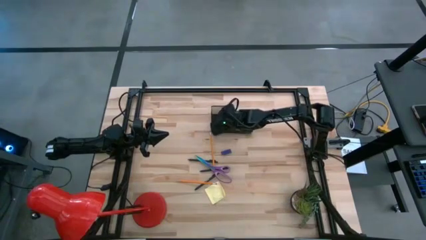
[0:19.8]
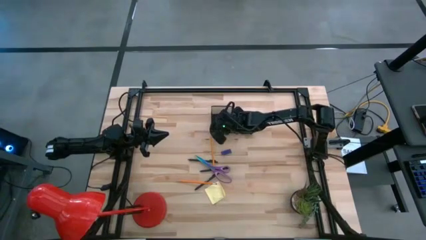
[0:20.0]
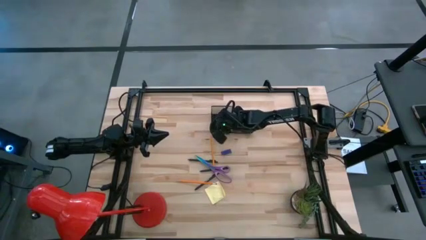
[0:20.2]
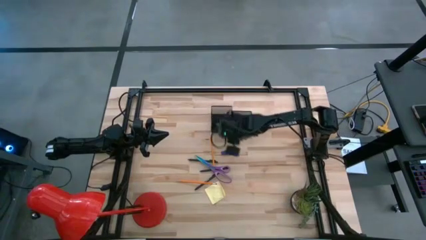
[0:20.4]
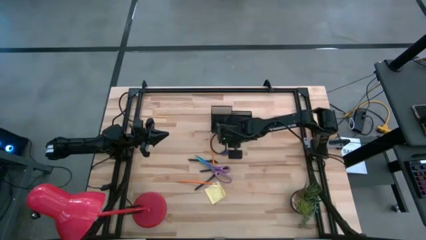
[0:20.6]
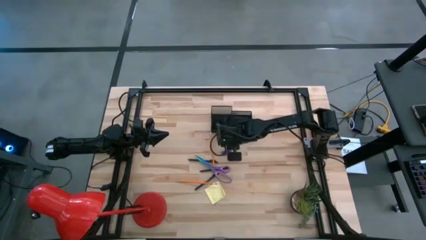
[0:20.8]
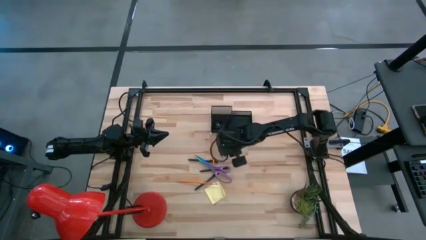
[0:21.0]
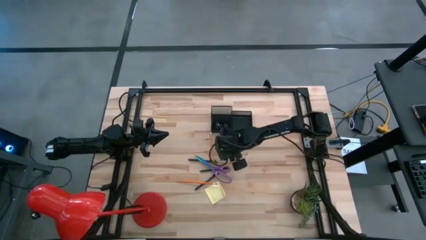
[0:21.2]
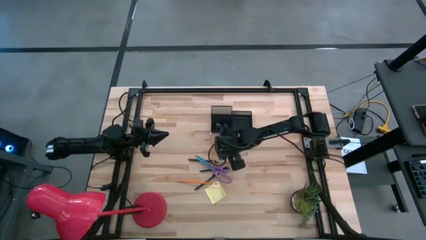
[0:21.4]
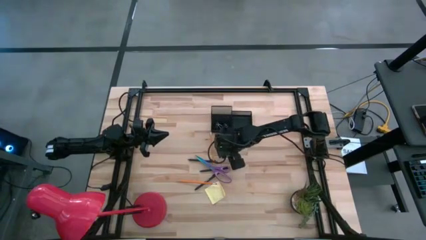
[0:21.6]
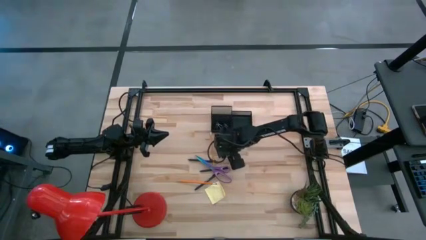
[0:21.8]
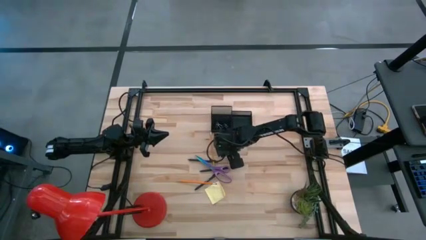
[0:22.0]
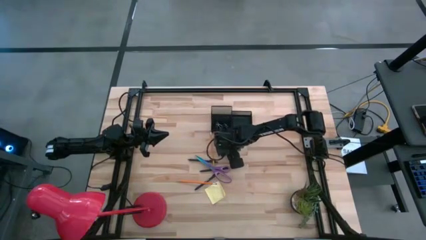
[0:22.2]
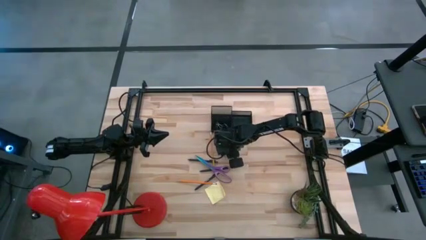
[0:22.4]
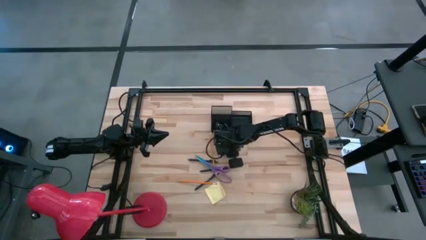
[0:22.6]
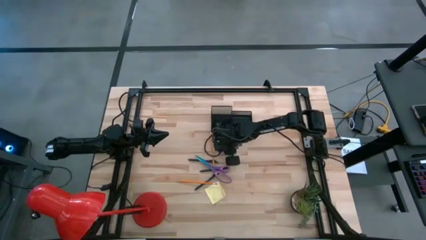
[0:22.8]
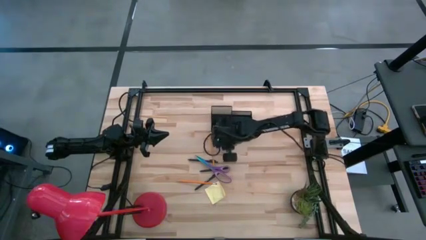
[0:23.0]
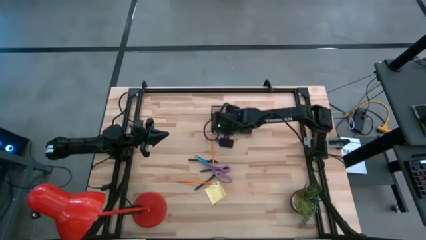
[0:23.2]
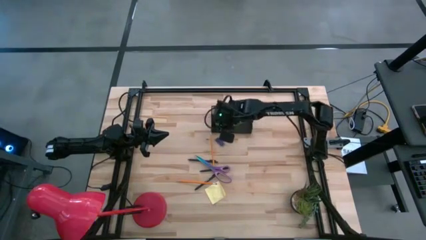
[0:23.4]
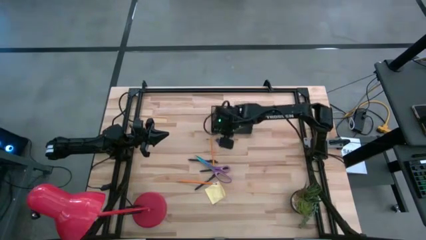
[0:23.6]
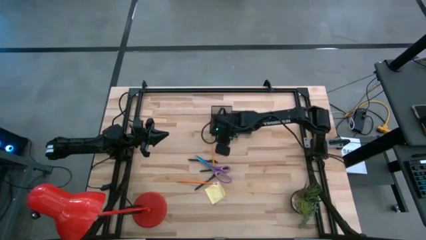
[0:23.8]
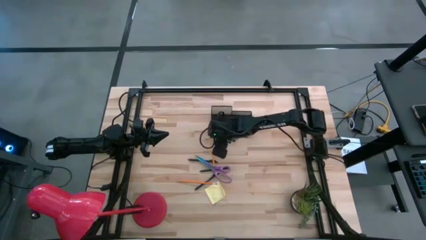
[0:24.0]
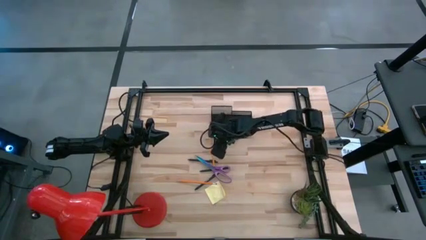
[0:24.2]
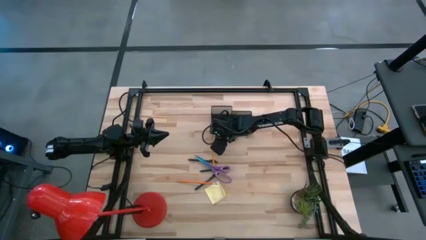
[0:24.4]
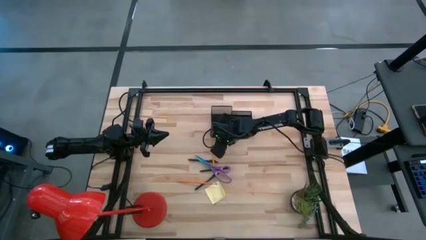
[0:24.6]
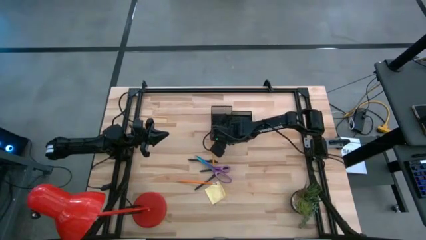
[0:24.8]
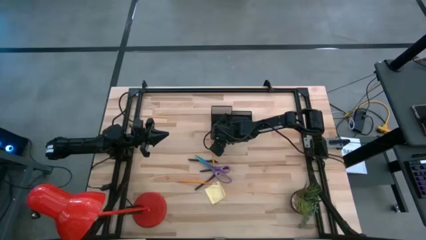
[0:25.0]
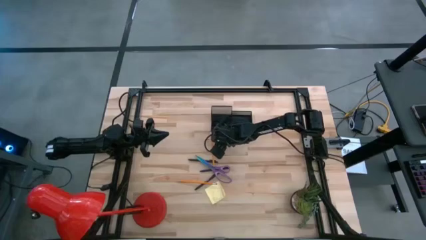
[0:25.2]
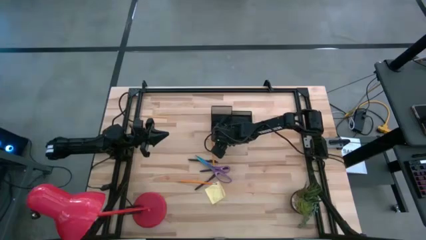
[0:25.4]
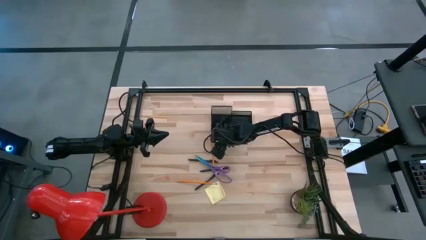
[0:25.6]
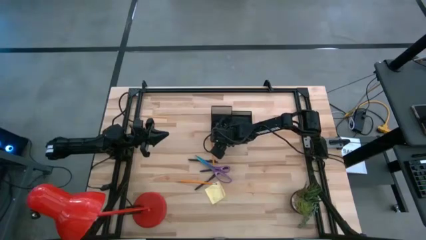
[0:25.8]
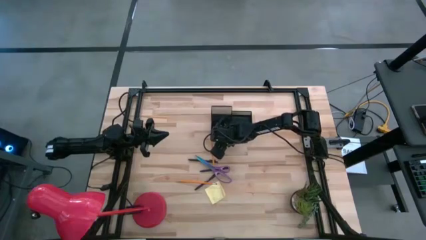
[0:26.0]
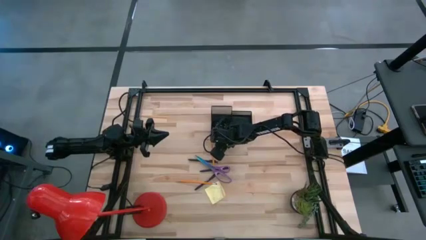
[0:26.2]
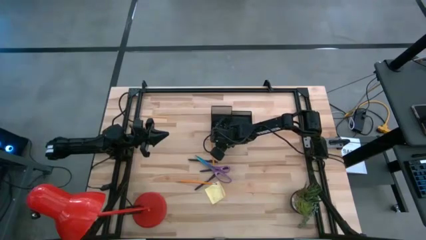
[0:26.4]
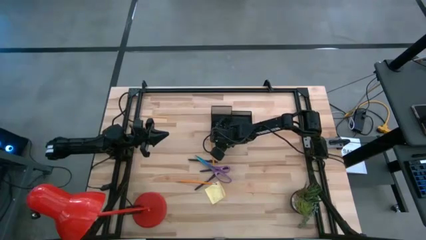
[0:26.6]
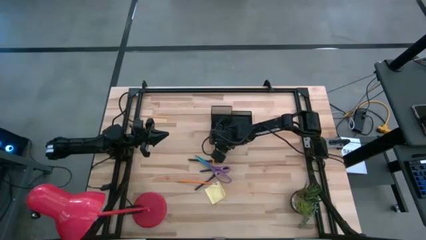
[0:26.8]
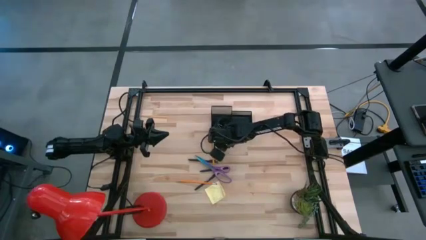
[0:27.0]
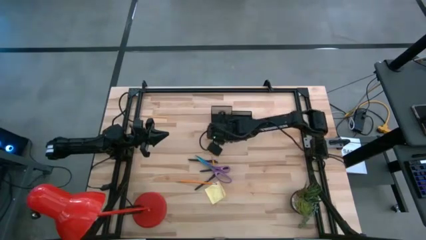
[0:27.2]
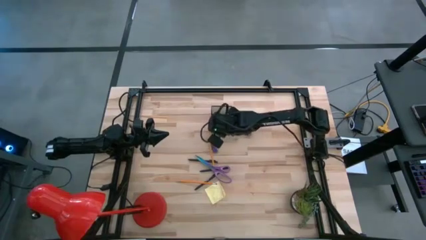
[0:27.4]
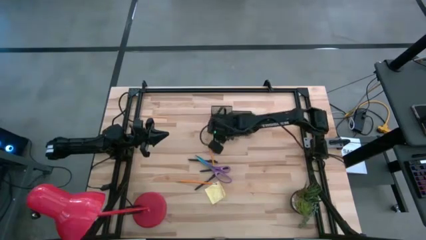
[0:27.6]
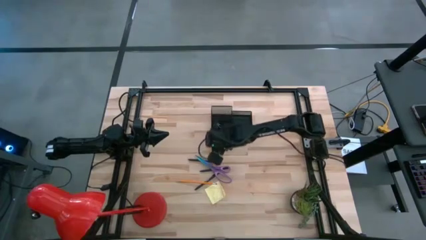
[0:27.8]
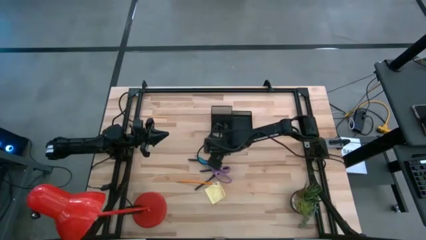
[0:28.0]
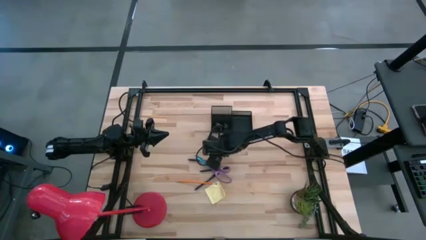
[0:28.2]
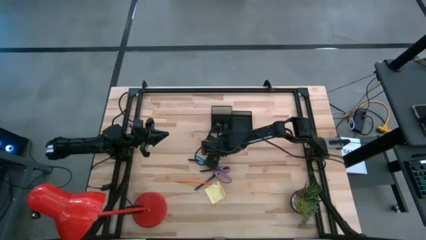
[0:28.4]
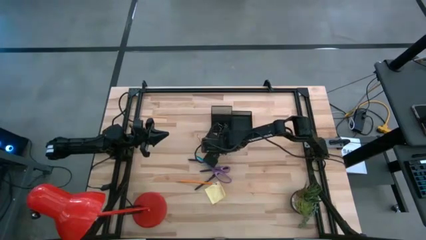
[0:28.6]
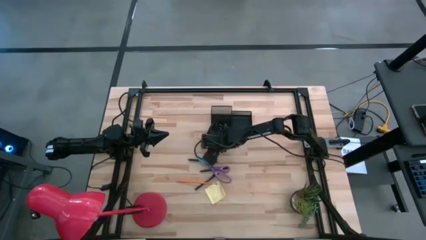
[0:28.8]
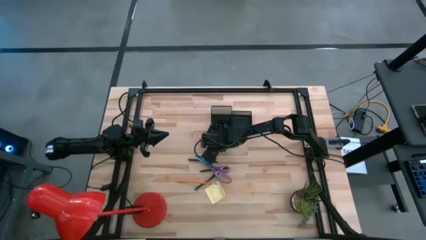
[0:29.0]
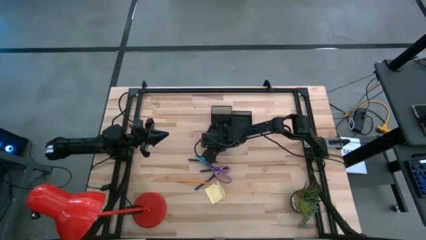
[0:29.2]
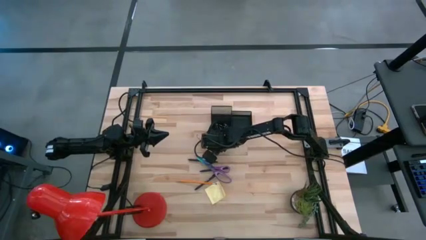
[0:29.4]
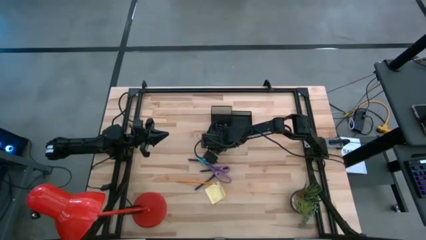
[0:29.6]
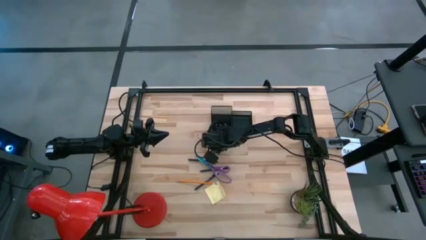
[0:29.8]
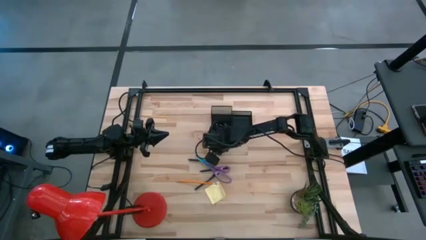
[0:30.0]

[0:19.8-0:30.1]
Task: Pick and place office supplies into organizer
Put the blue eraser into the desk organizer

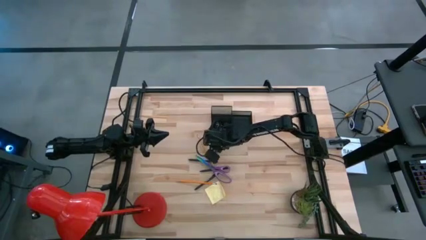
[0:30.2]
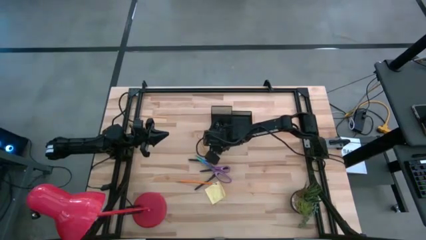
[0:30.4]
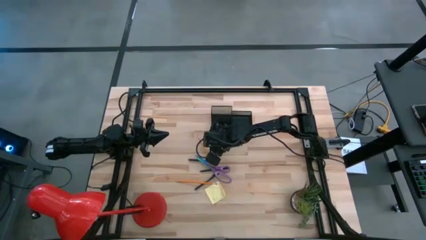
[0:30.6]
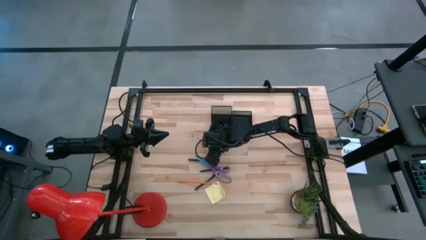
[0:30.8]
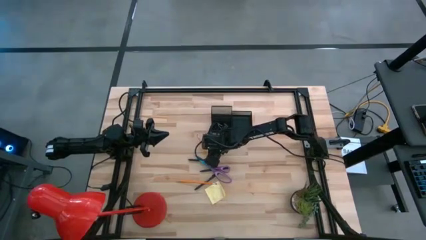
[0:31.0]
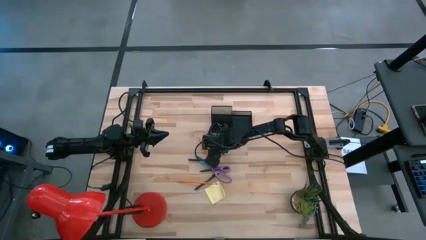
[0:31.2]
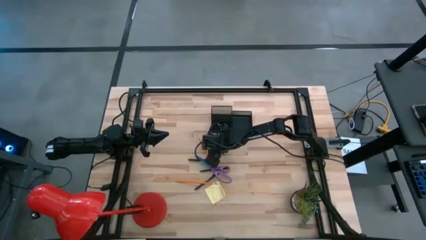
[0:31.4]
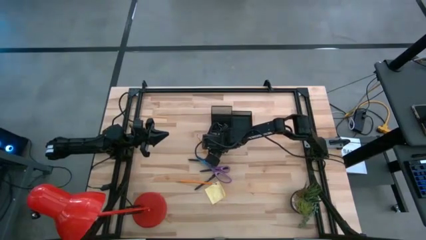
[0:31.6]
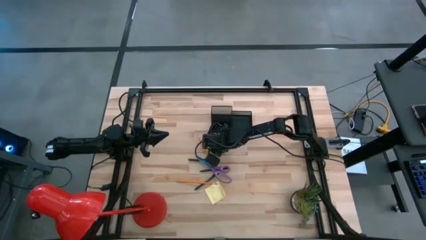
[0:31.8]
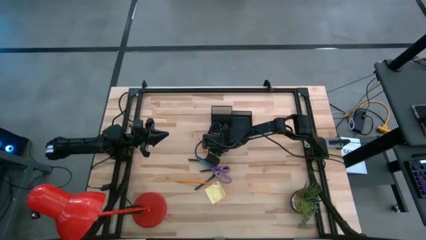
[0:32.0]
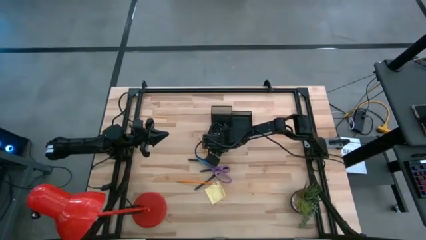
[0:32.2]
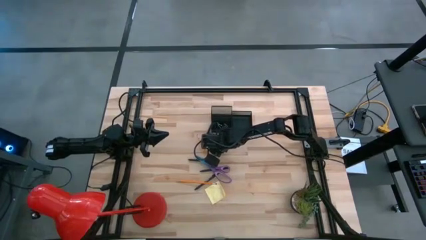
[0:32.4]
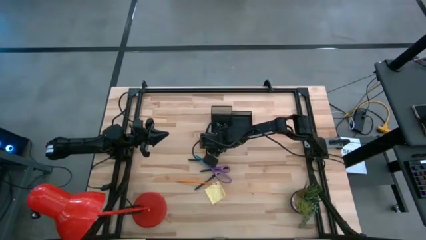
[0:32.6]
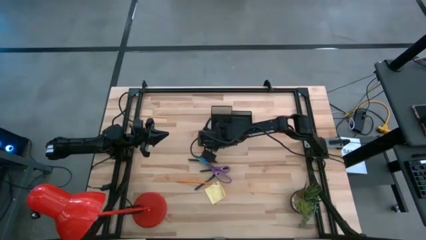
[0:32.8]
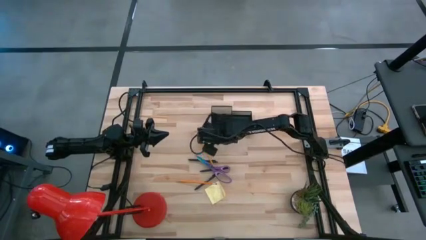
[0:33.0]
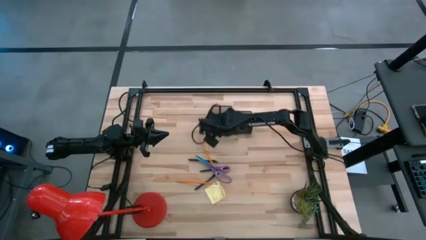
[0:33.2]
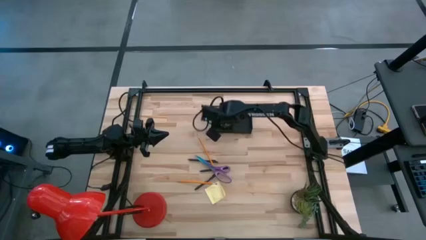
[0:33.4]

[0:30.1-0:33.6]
Put the blue eraser into the desk organizer

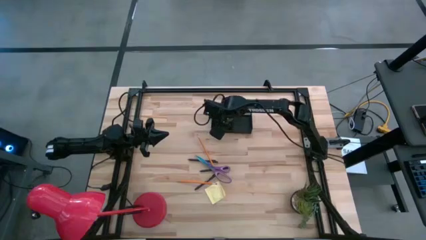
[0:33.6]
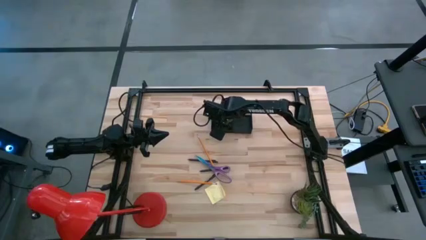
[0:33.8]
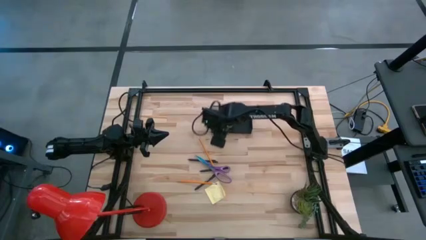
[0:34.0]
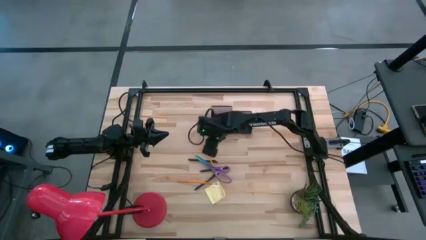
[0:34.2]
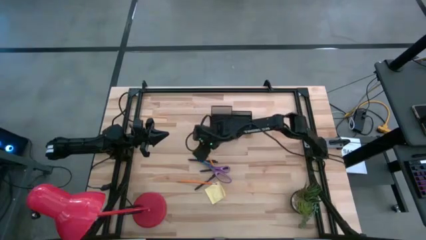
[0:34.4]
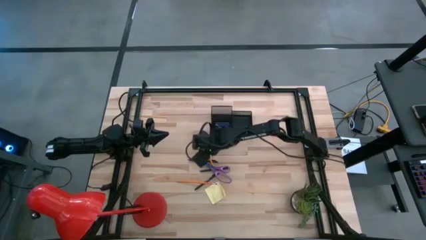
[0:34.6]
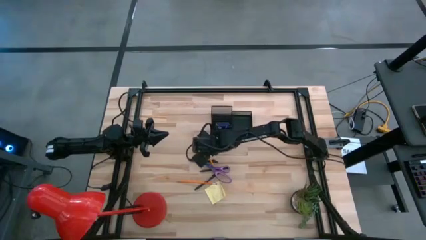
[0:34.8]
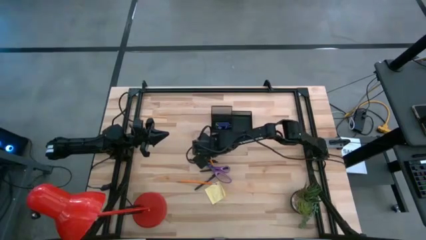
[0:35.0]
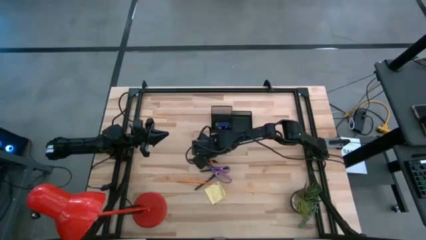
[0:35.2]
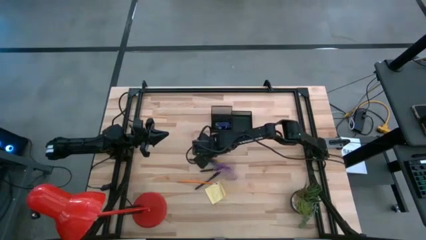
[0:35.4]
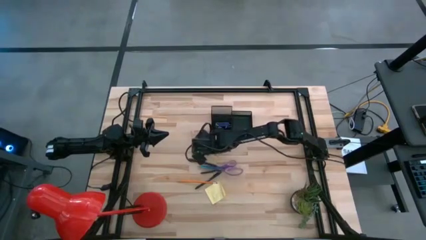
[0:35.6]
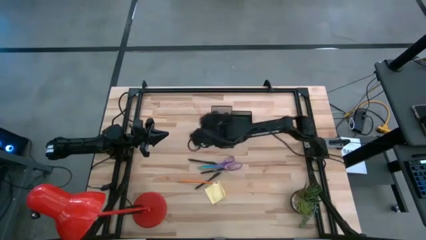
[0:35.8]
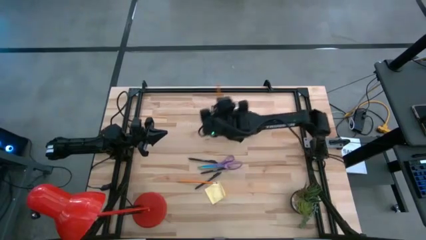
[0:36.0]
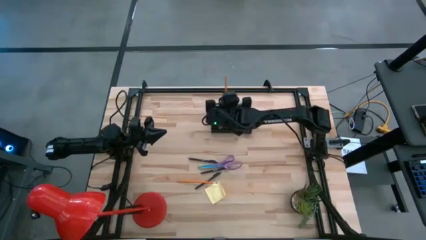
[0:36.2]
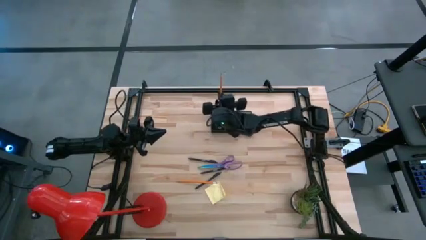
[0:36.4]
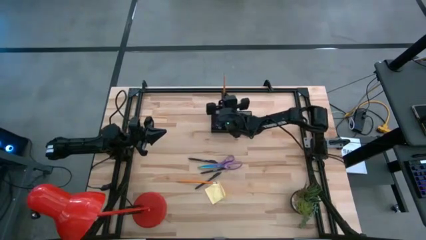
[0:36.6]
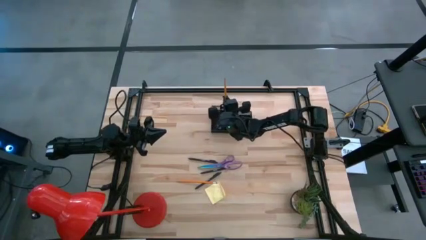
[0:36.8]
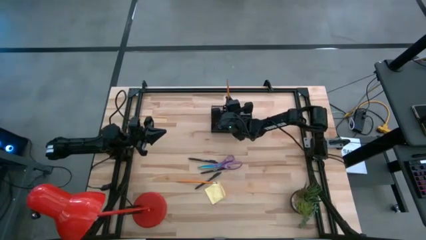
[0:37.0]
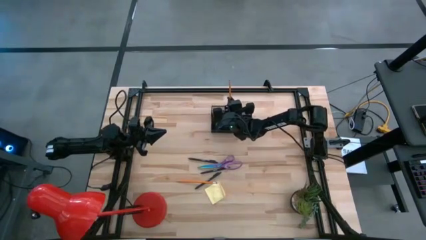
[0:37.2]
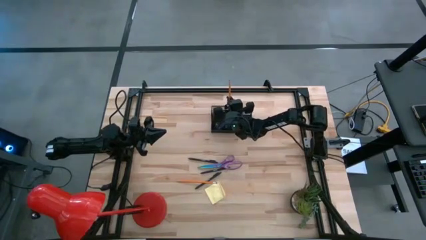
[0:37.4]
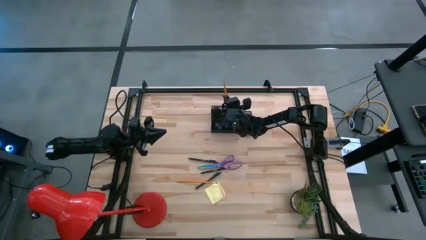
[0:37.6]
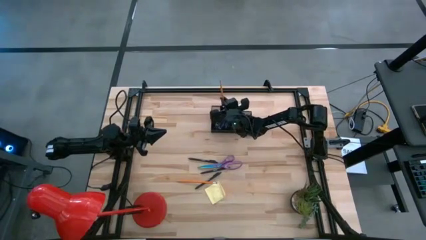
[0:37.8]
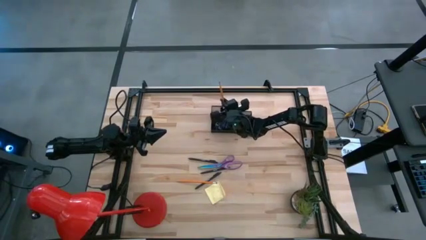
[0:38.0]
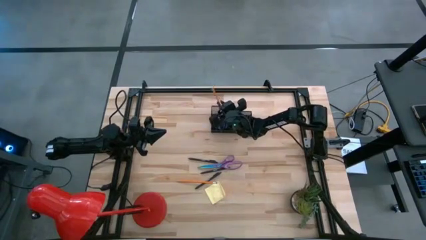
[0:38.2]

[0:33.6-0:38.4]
Put the top orange pencil into the desk organizer
